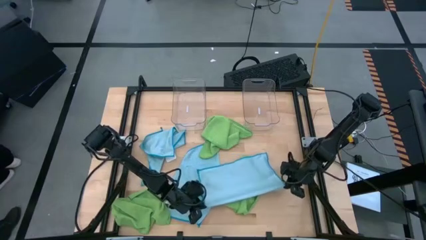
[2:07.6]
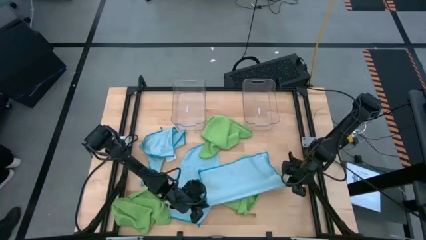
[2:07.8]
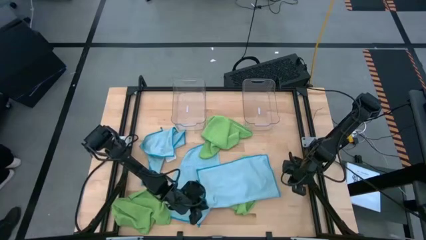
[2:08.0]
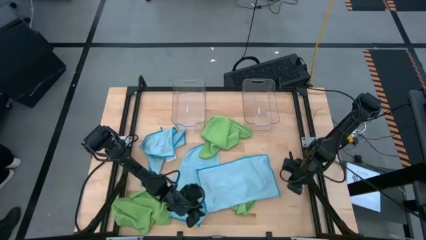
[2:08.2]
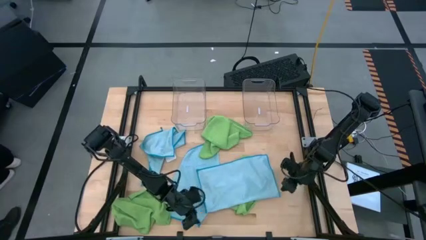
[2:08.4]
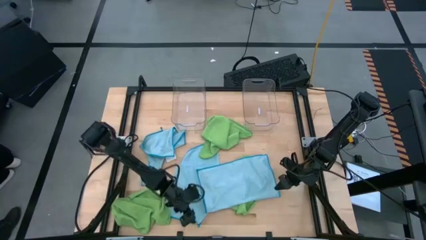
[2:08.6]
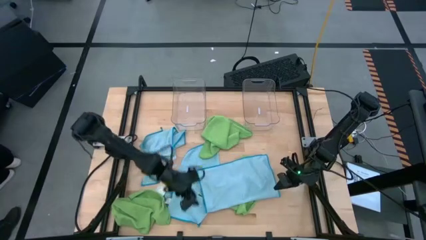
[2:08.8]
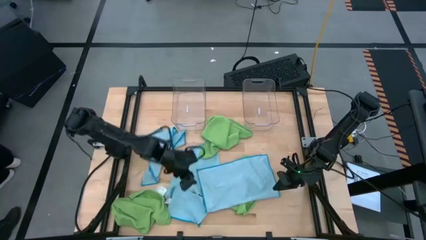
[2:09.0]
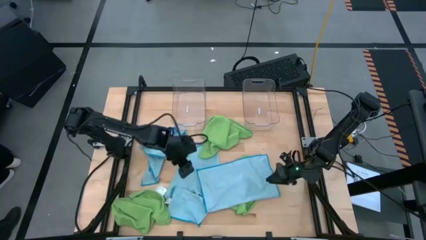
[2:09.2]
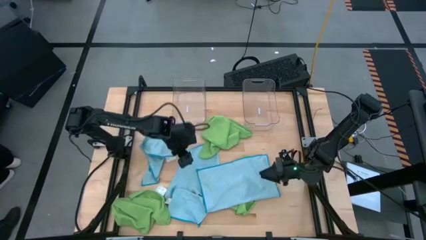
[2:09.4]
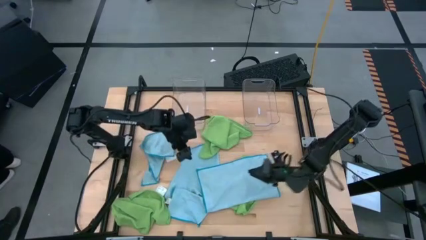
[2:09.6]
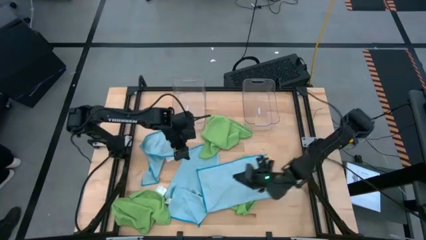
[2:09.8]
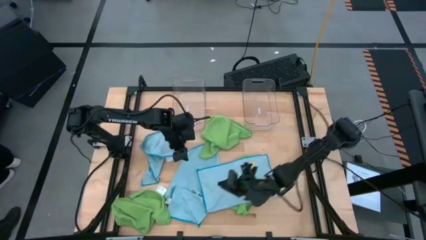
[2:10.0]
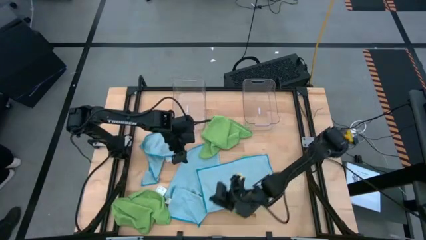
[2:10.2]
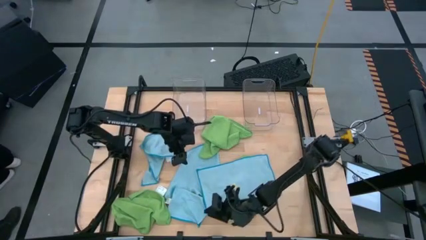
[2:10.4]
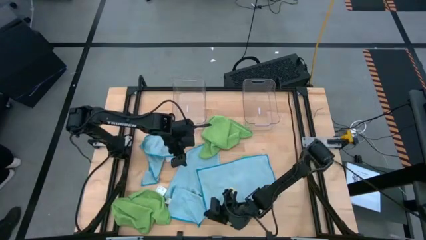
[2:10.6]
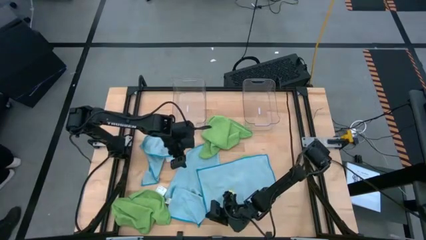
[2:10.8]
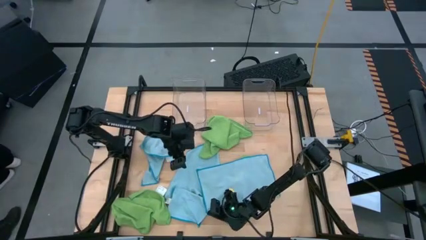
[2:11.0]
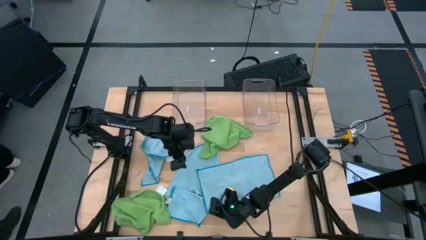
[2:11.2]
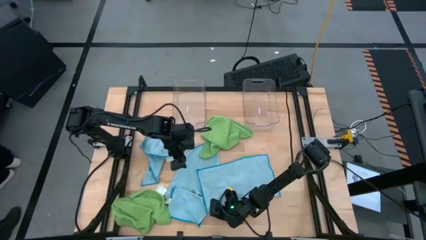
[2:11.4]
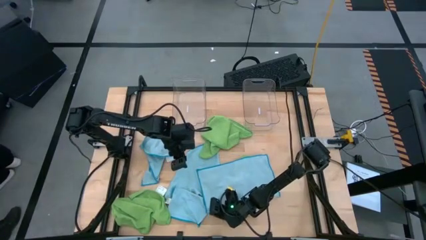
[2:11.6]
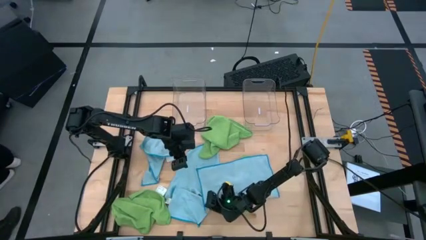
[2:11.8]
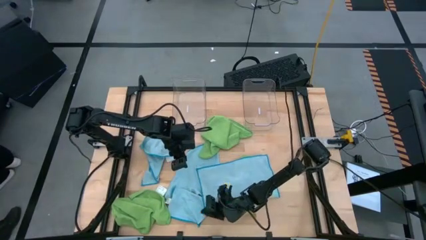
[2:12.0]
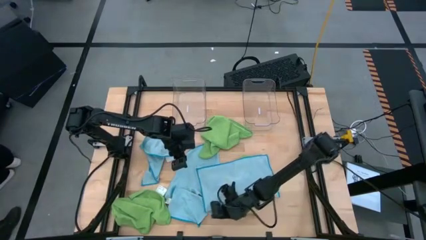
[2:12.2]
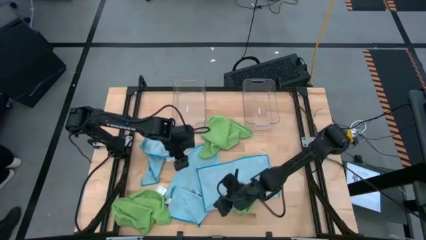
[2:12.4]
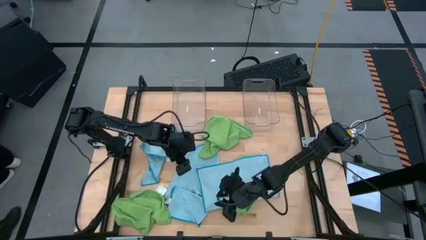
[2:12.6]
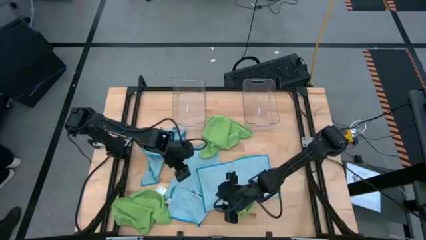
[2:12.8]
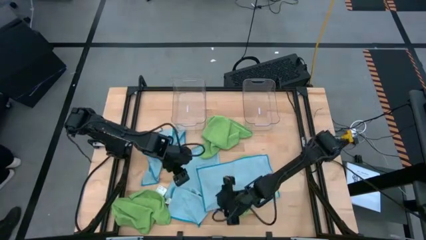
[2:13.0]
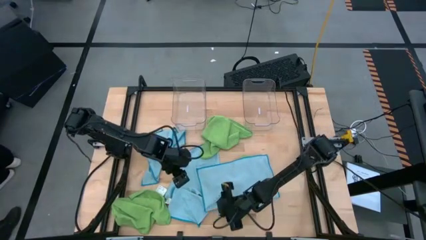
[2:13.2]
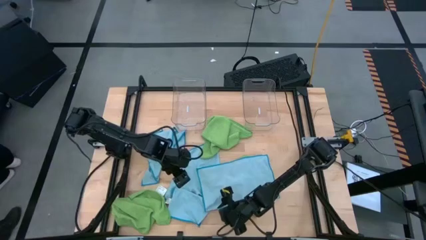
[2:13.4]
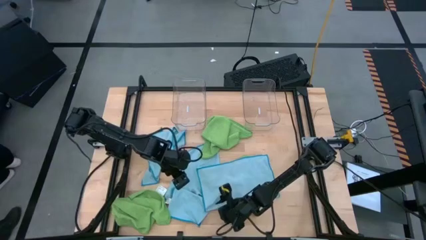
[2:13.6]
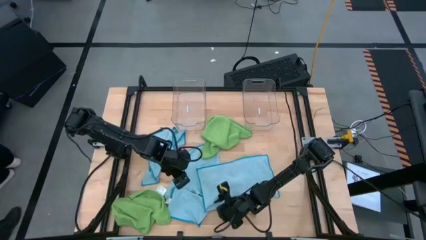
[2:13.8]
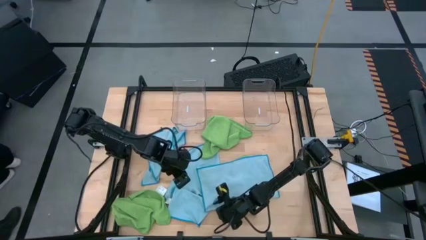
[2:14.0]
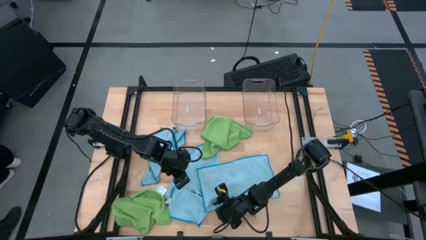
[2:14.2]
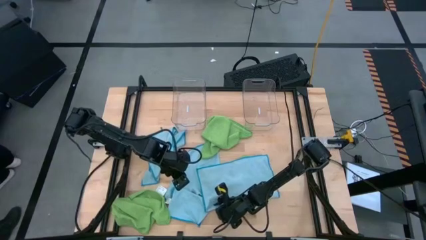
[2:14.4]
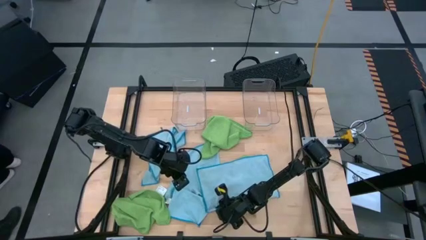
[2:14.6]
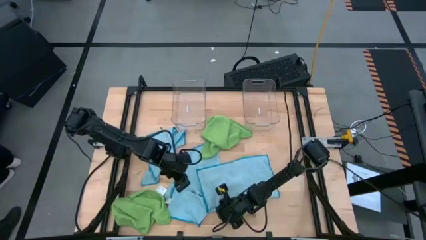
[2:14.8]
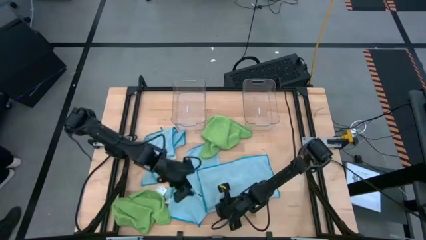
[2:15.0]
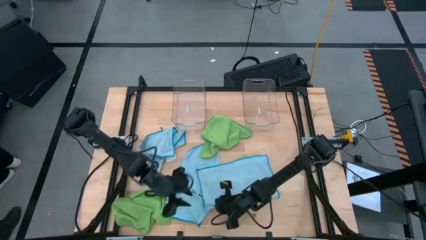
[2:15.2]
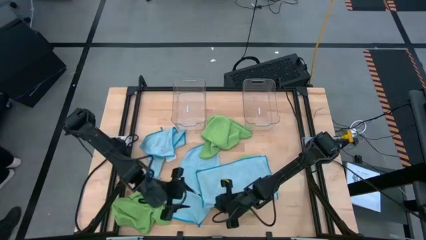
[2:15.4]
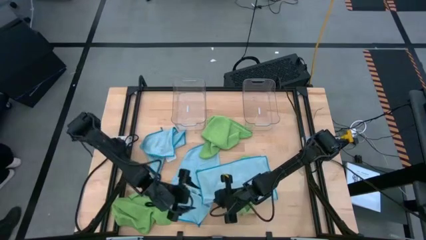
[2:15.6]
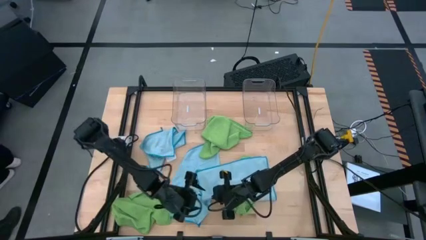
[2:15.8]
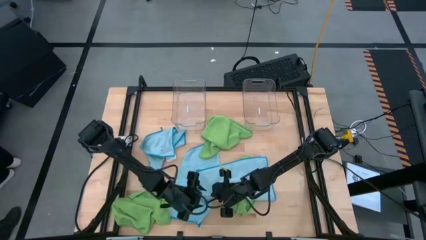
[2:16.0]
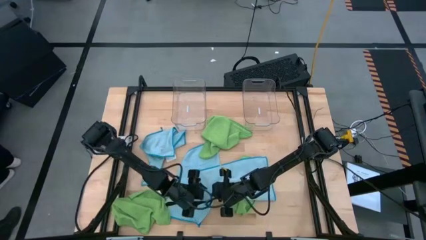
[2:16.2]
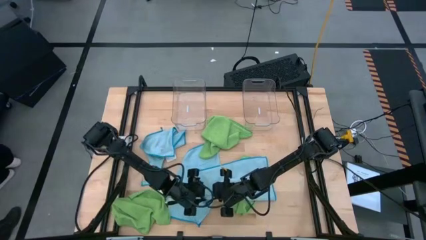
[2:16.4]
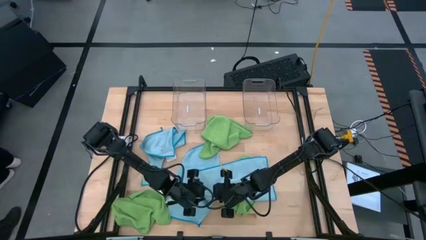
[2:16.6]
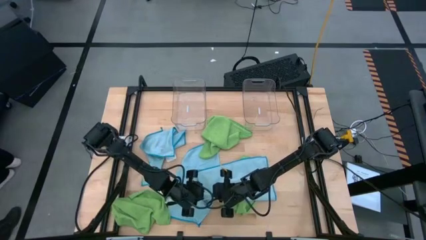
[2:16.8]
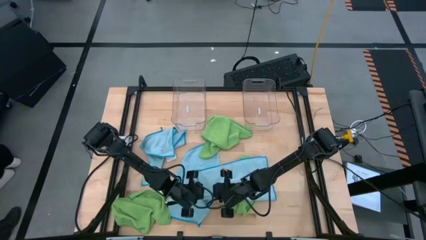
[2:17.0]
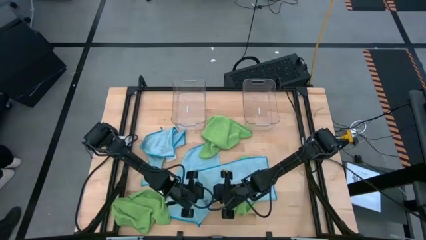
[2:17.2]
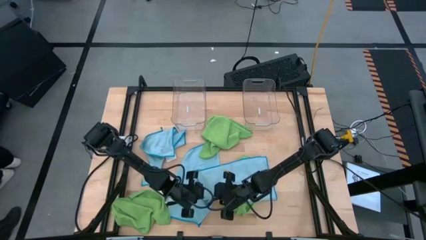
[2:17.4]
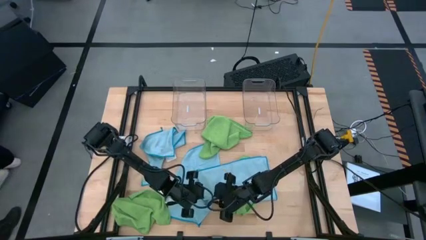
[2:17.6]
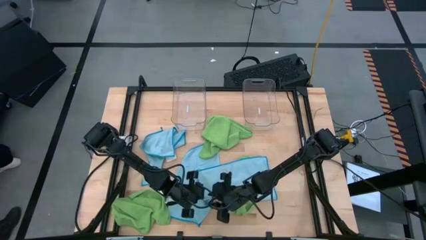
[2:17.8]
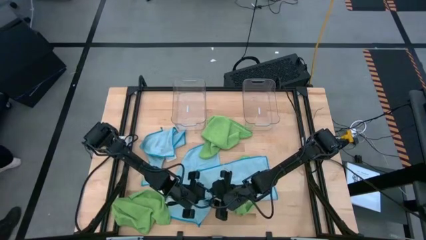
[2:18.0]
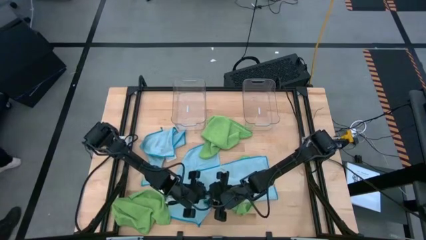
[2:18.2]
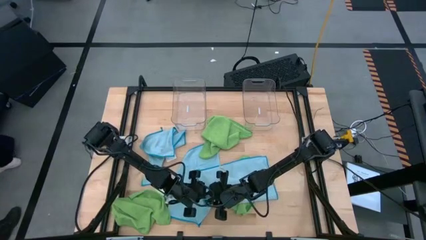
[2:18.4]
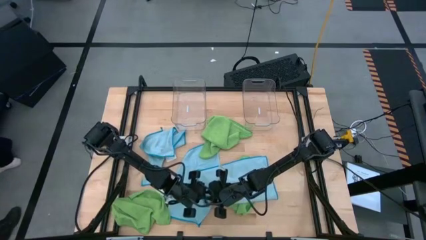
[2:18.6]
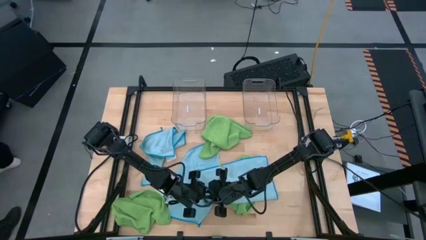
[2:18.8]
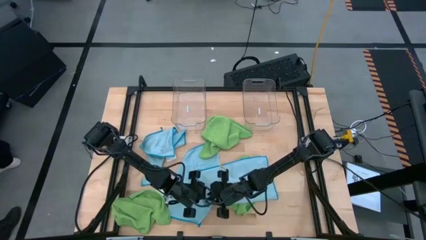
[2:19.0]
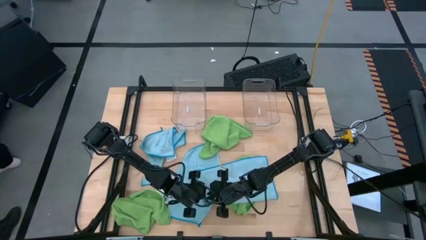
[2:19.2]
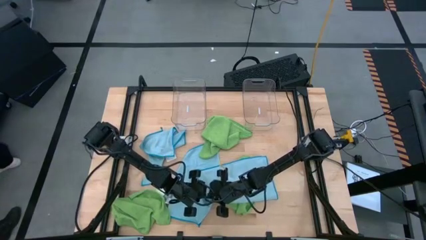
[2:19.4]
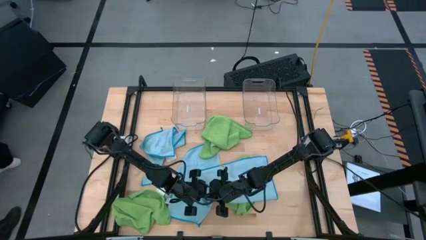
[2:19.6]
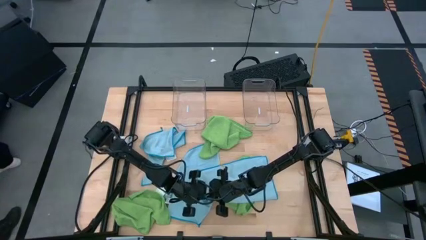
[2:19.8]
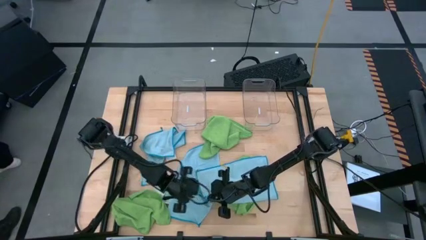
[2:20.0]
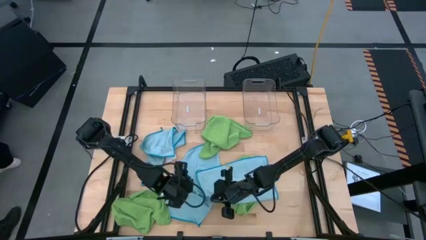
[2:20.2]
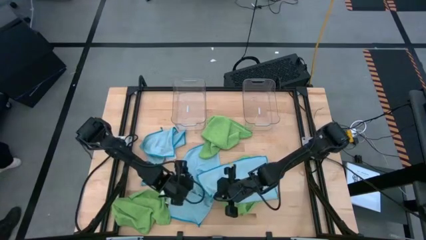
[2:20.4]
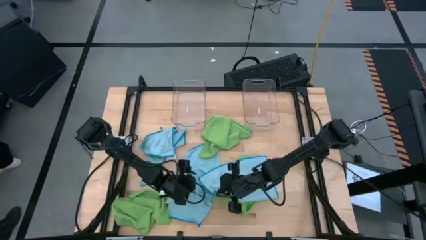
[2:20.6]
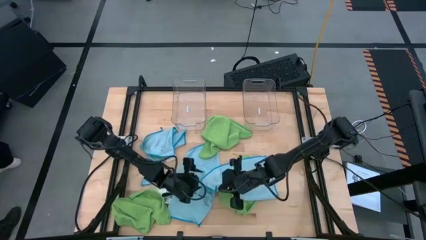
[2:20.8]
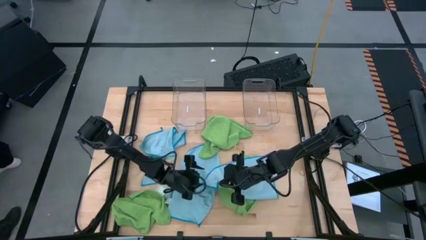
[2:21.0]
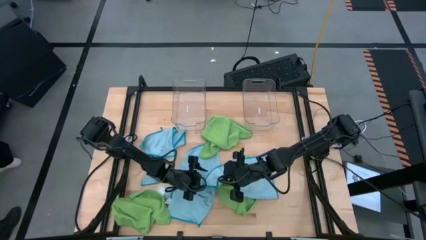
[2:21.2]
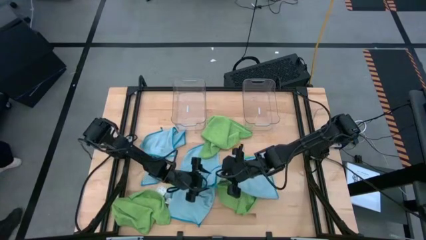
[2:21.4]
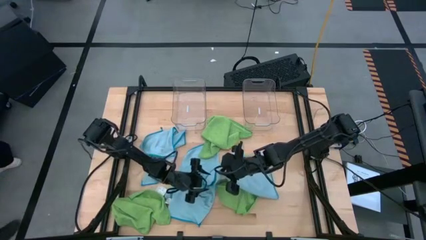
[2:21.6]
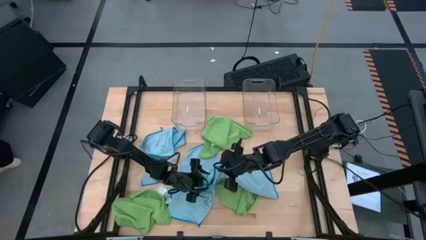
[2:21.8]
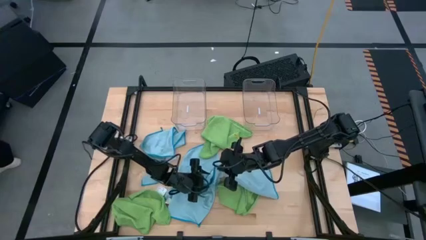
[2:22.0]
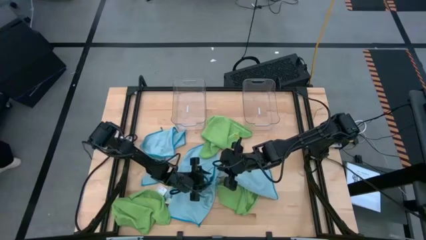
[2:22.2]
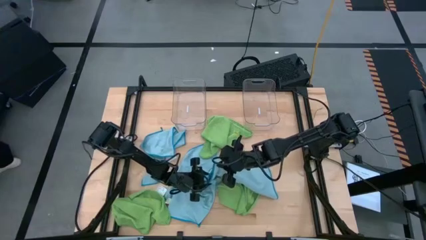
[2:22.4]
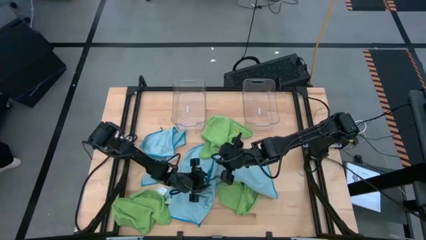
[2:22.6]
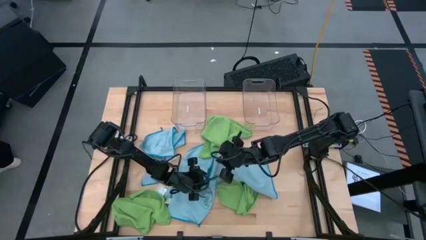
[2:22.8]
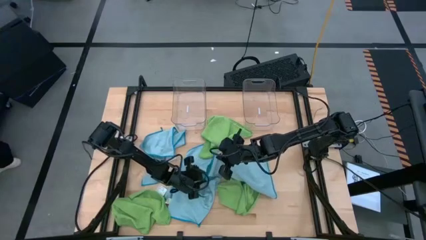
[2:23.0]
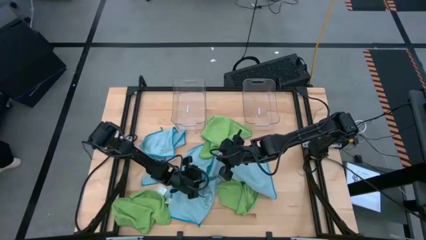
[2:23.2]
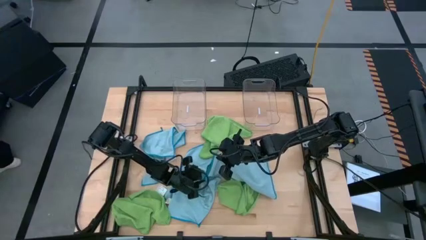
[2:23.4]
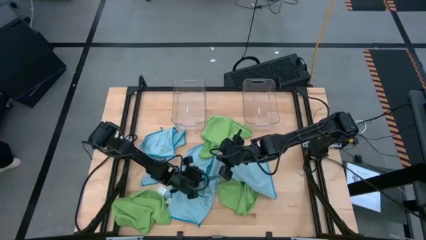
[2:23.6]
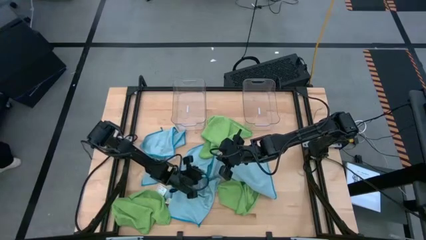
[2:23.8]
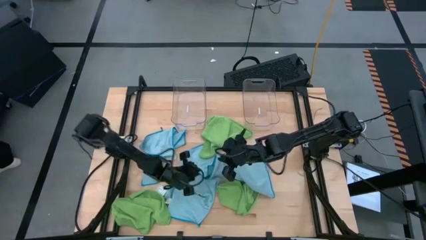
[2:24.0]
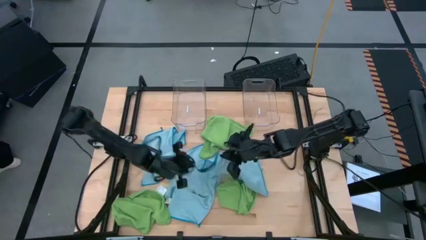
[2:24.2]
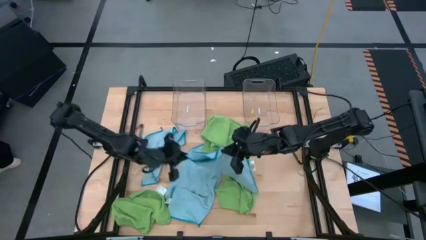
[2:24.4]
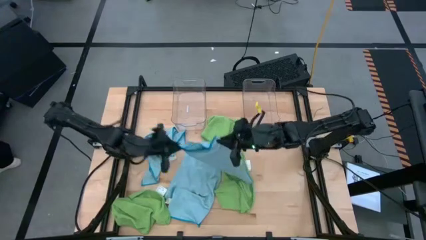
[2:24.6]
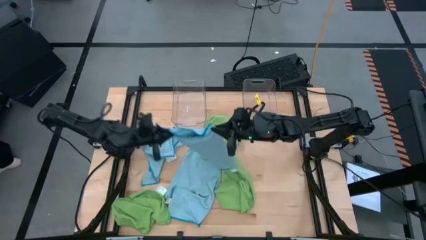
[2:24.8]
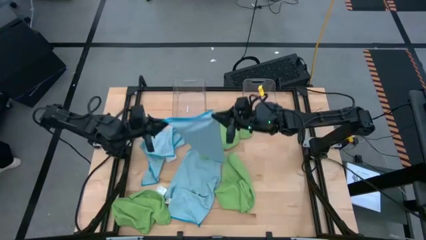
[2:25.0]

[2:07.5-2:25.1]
Task: Fold microfiber towels
Fold the right blue microfiber towel
